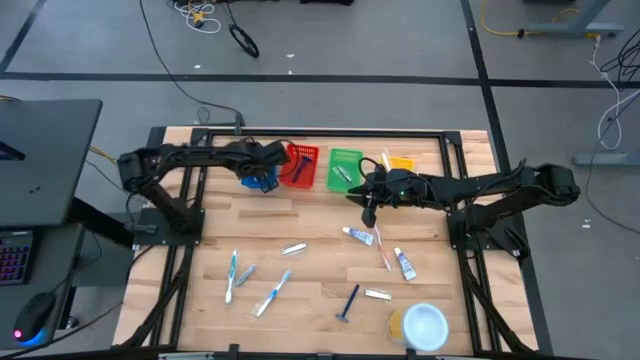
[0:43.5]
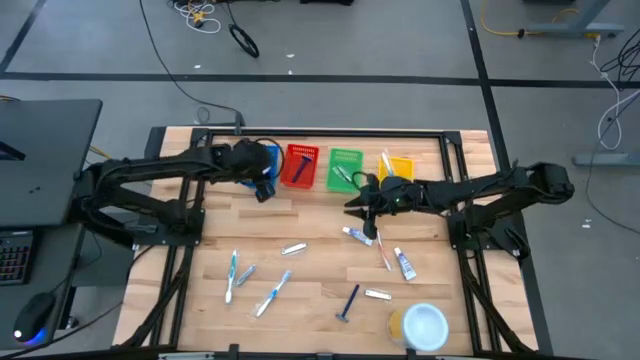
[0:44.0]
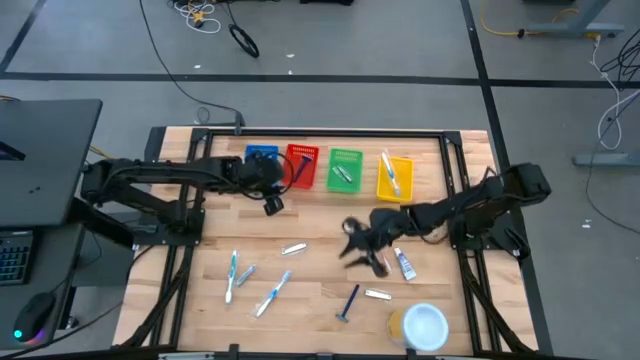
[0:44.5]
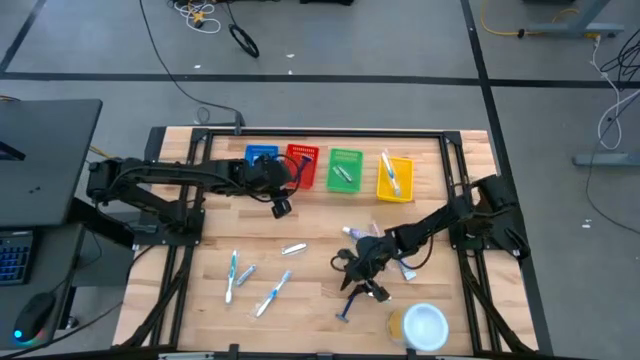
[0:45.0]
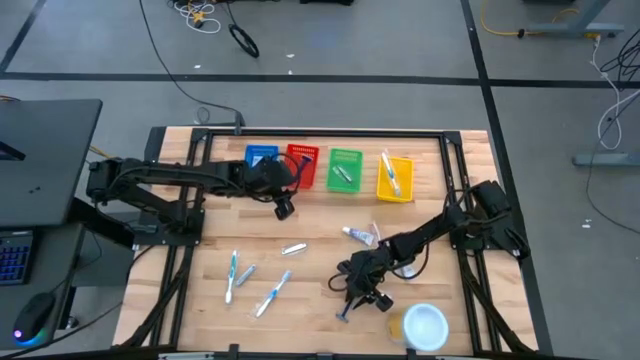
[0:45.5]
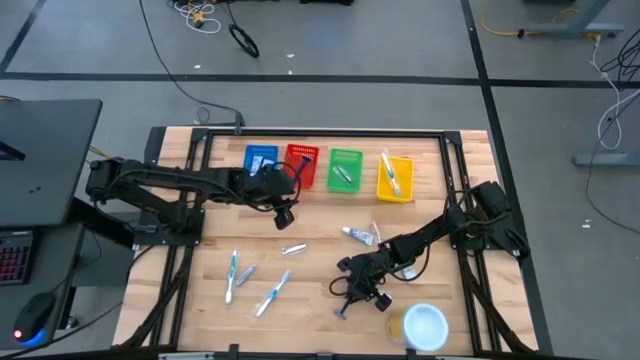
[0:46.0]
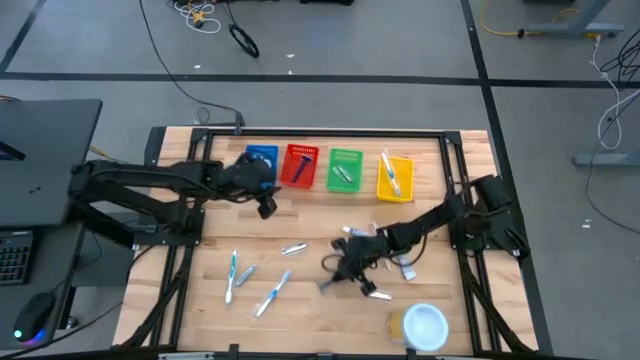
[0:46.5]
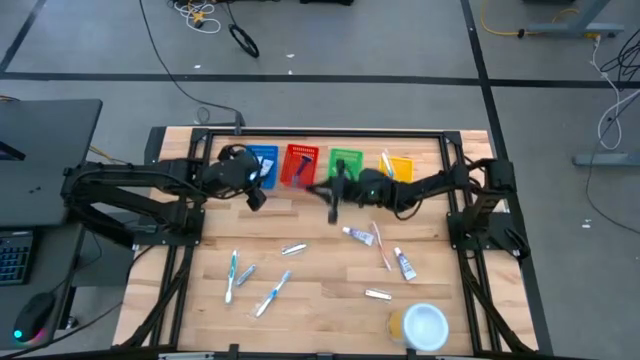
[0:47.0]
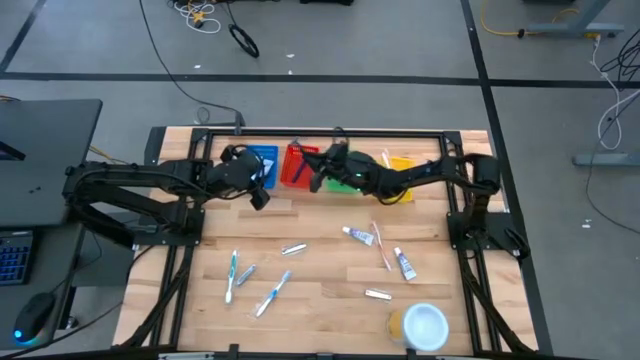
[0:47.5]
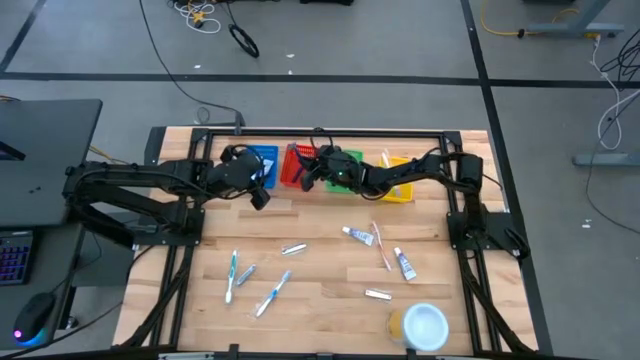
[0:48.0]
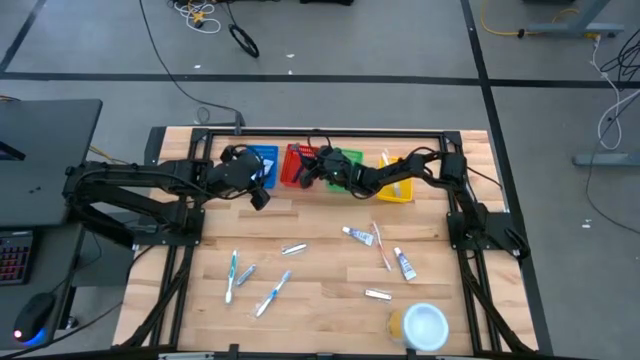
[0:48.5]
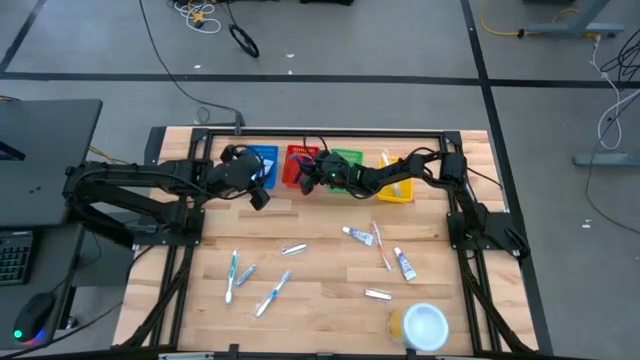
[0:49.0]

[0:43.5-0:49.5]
Task: Pick & Place Travel size toiletries
Put the blue razor into the orange bin

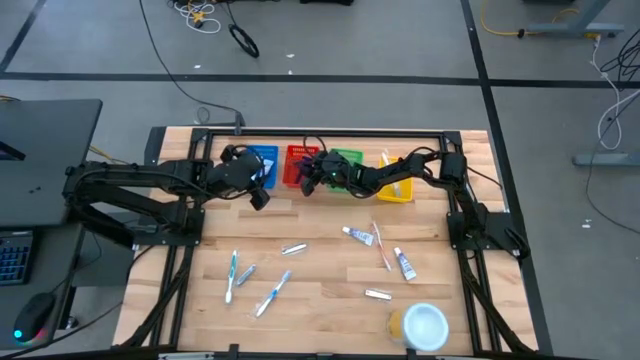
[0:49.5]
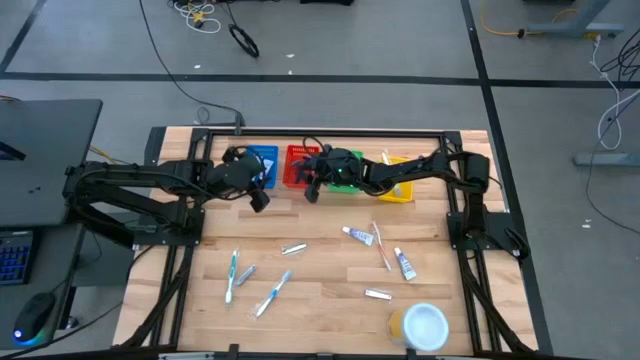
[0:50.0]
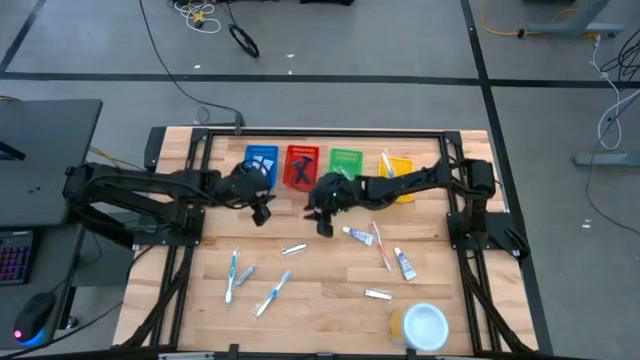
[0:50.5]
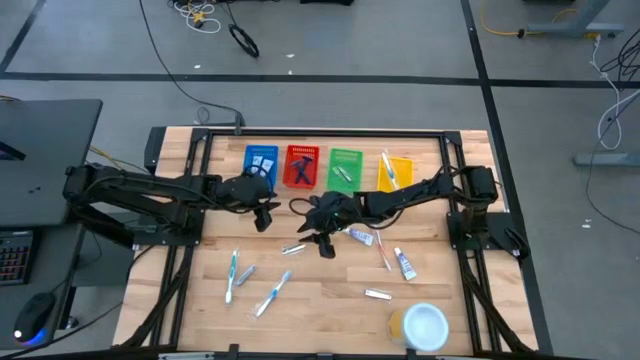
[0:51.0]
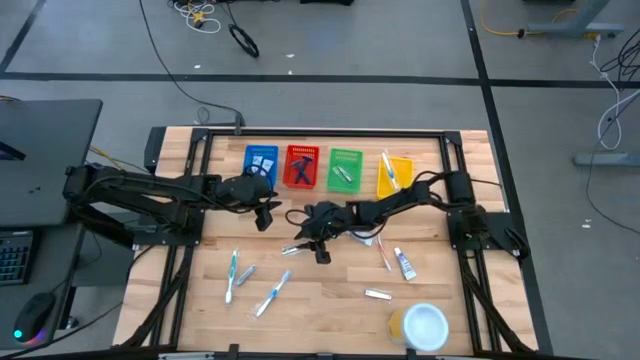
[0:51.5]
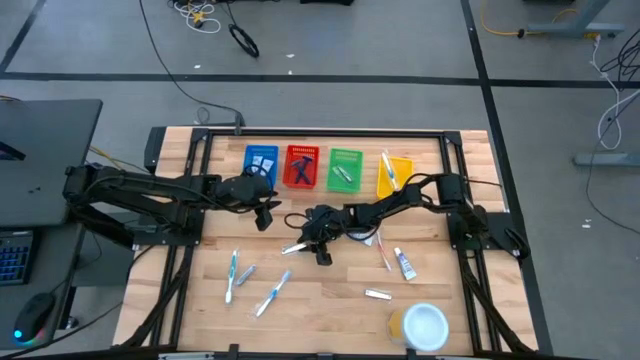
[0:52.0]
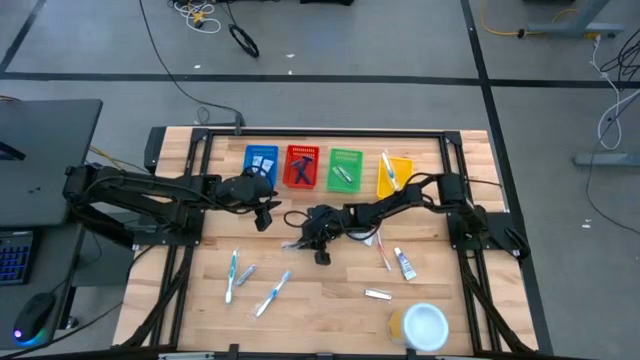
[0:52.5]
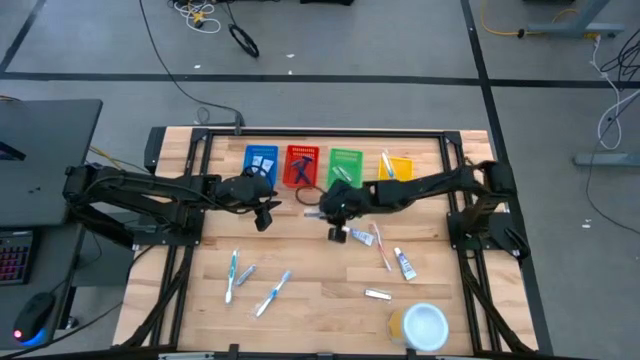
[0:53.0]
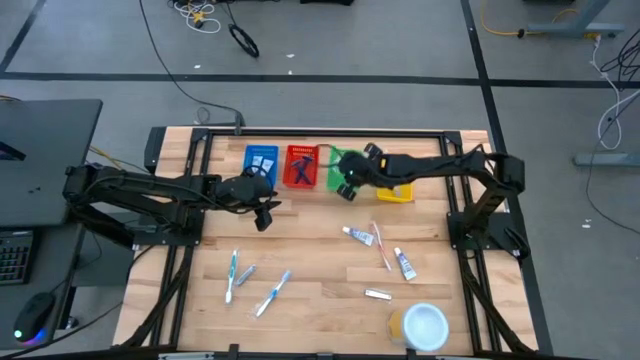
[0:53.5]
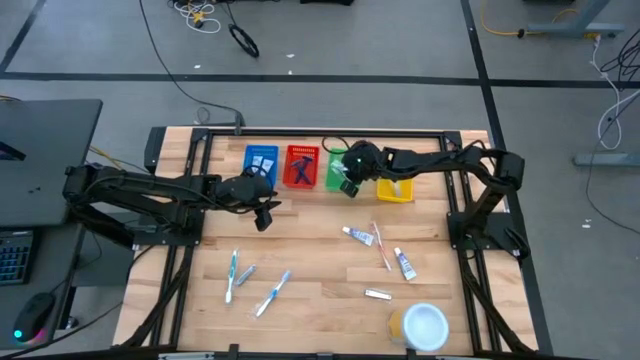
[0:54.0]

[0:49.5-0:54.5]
Put the silver nail cutter into the green bin

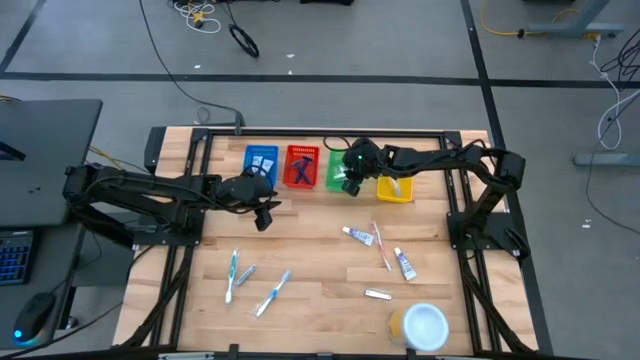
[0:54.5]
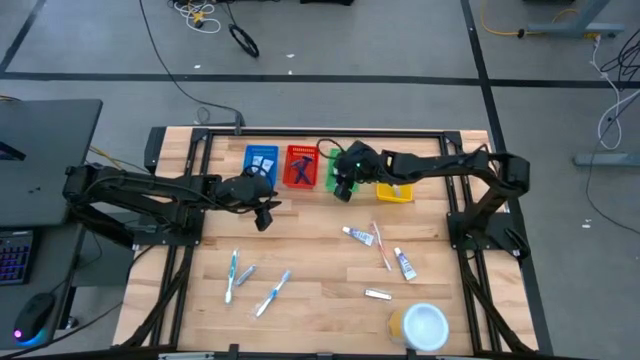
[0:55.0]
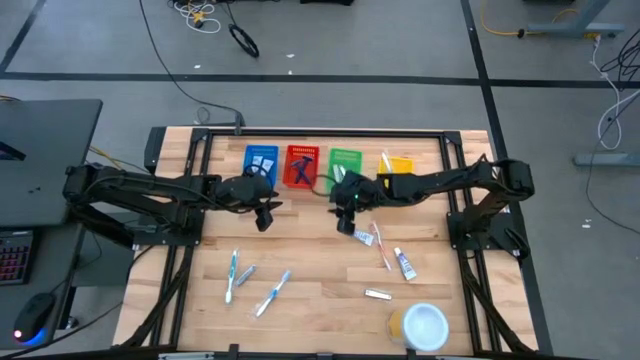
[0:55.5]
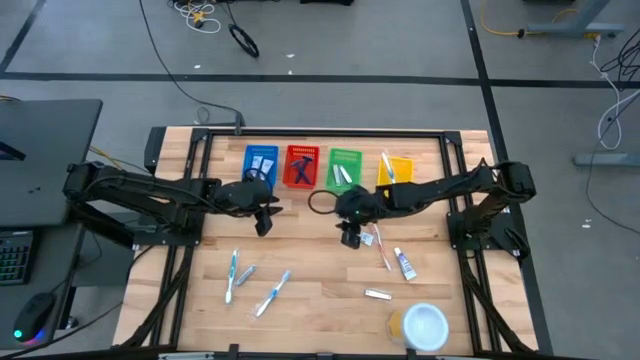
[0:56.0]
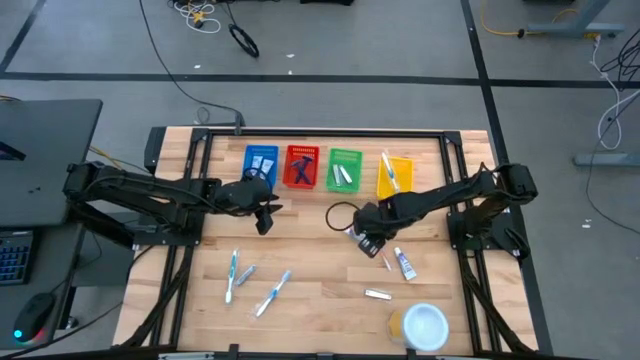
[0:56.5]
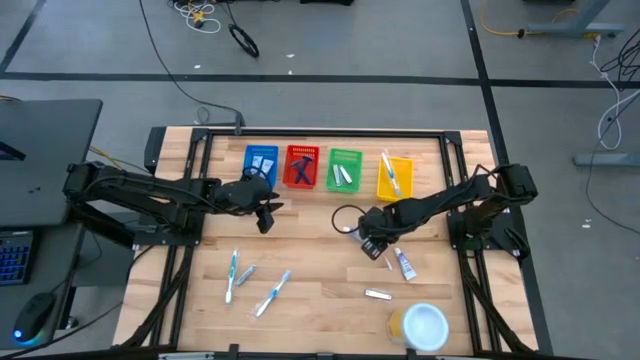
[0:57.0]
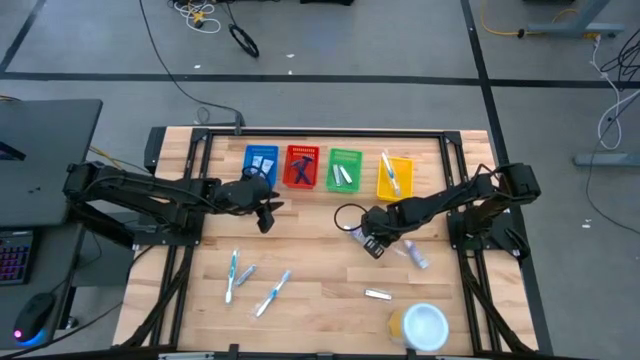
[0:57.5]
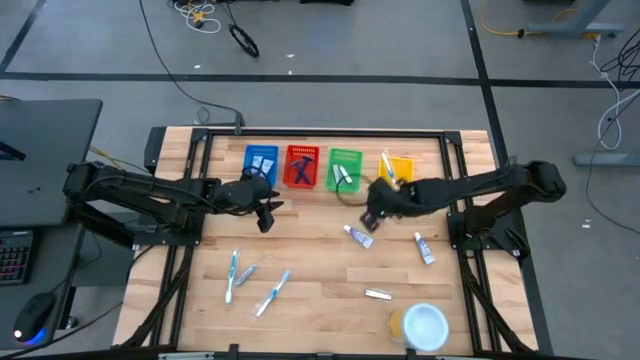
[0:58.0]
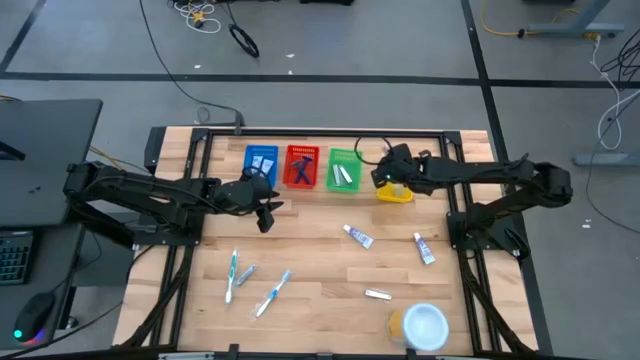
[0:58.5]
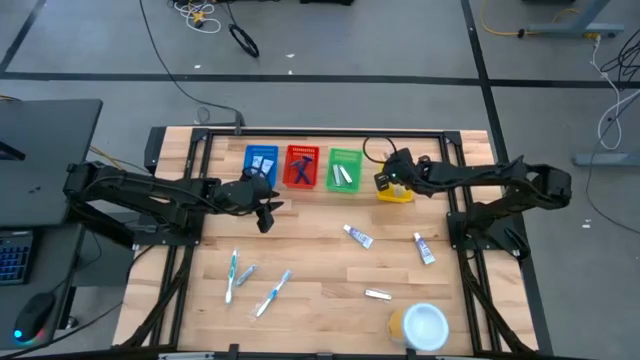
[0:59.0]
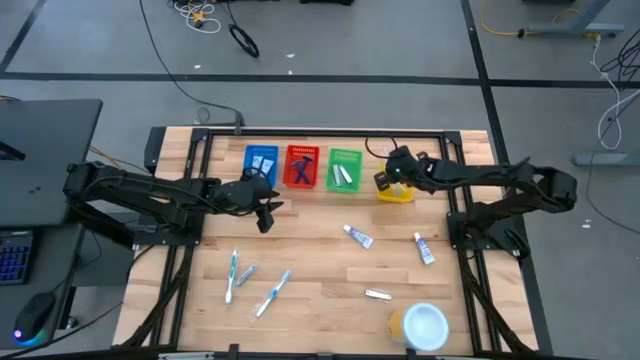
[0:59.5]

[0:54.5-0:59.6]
Put the orange toothbrush into the yellow bin

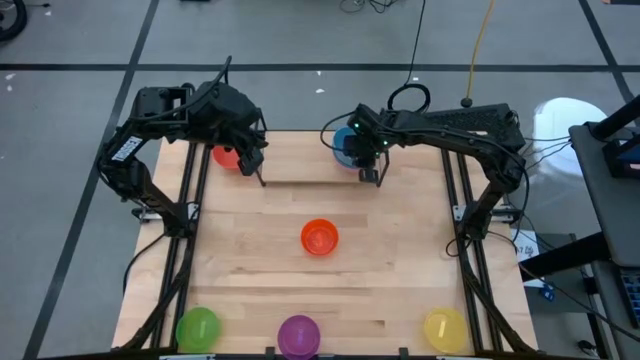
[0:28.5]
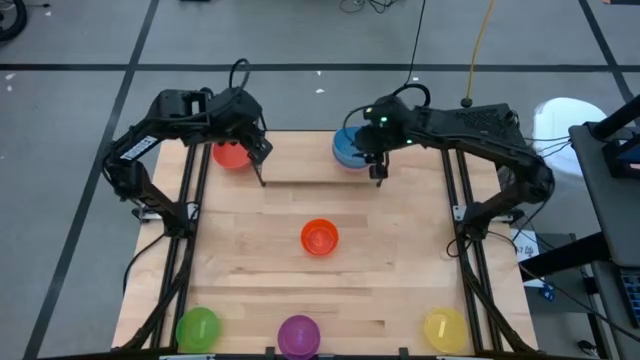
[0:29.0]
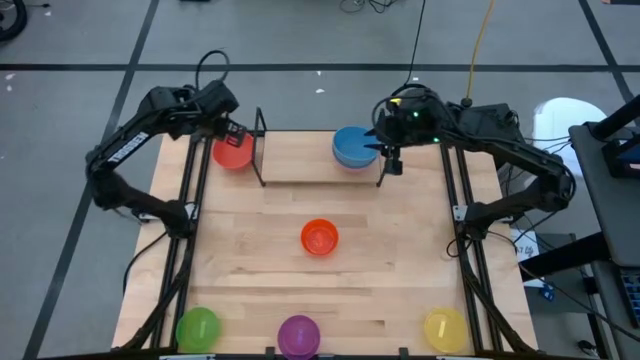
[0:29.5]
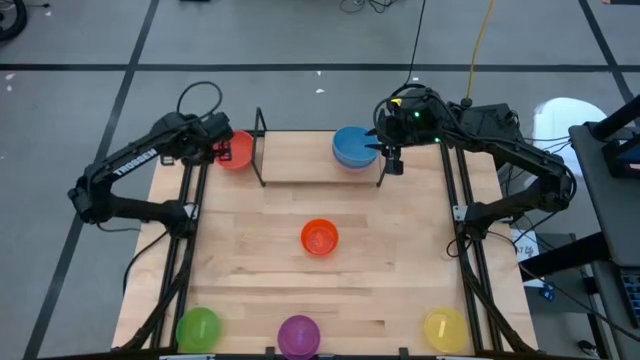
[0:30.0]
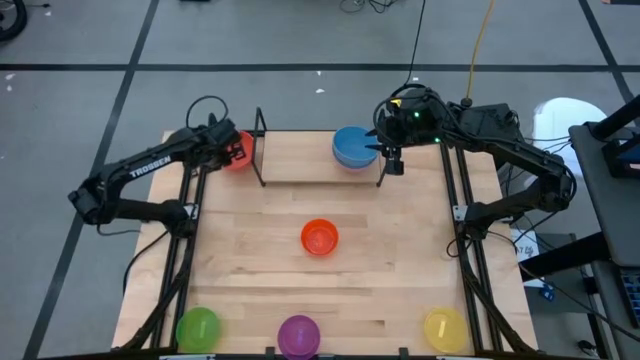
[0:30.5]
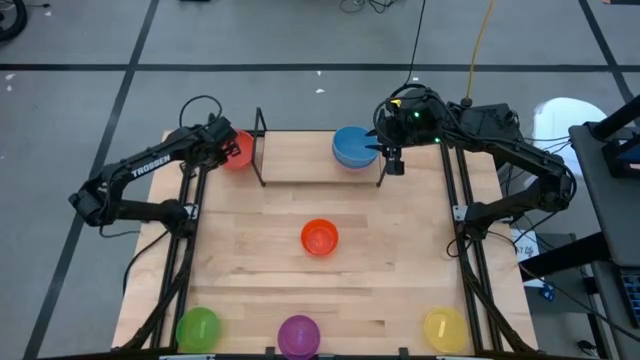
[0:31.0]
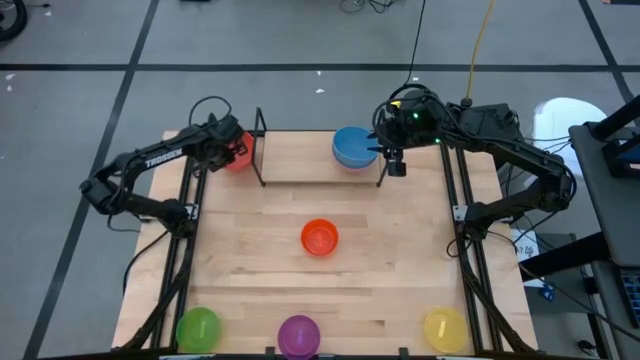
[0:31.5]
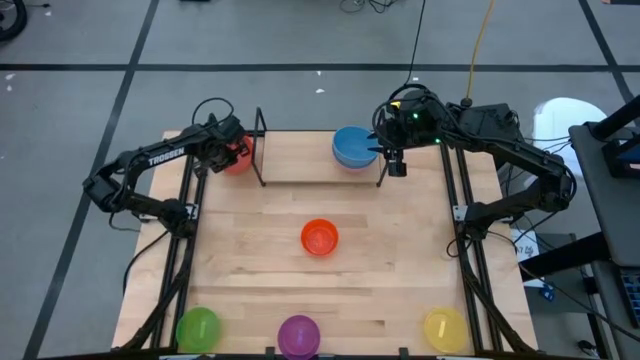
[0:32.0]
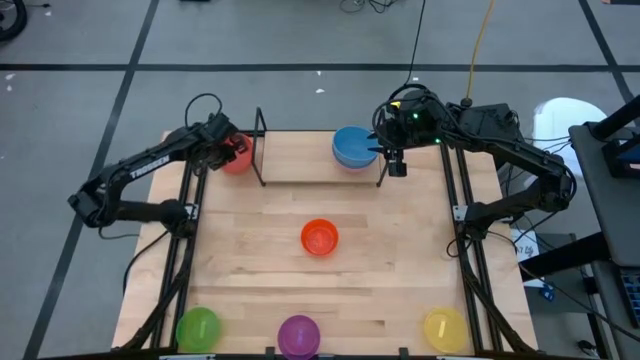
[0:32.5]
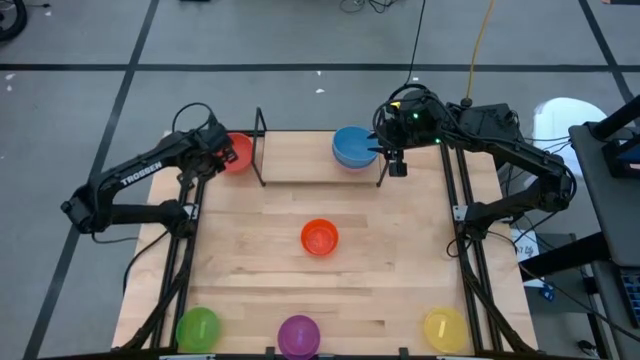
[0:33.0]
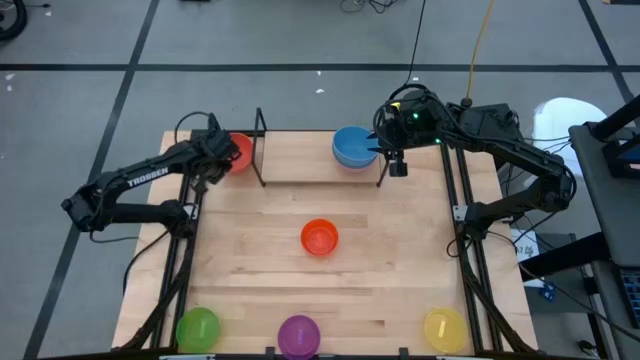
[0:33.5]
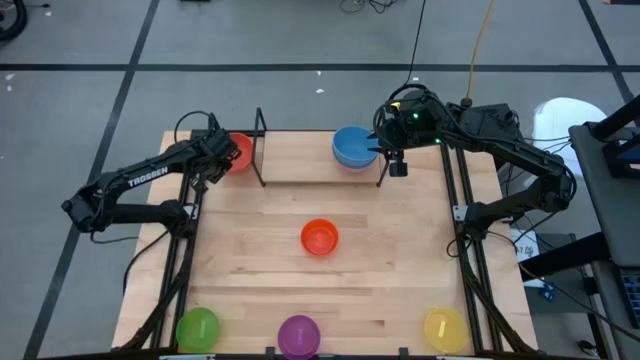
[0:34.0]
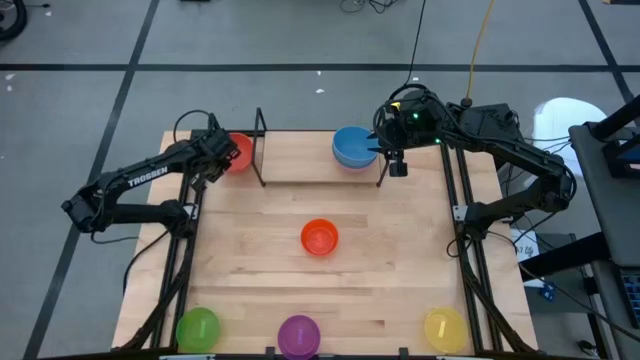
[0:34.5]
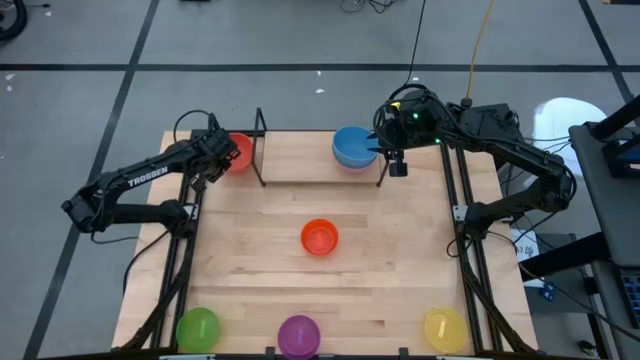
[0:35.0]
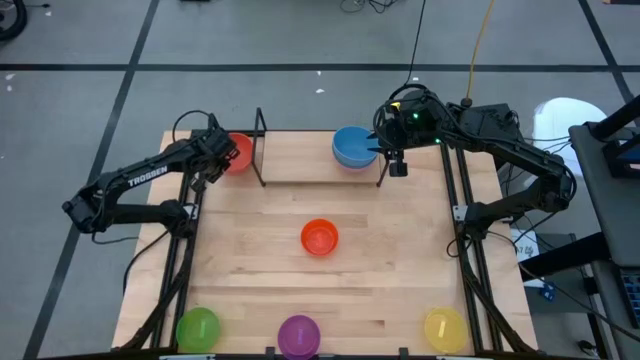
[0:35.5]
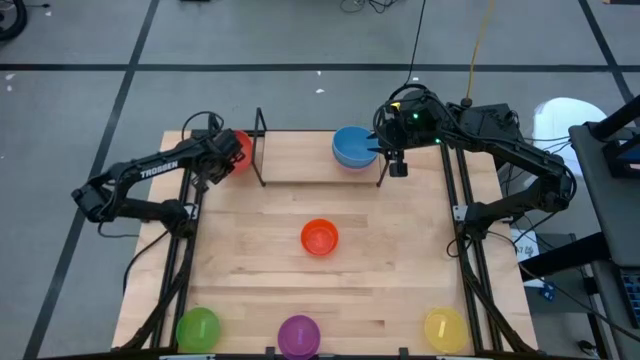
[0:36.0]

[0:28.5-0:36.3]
Task: Place and stack bowls onto a shelf
Stack the large orange bowl on top of the blue bowls on the shelf
